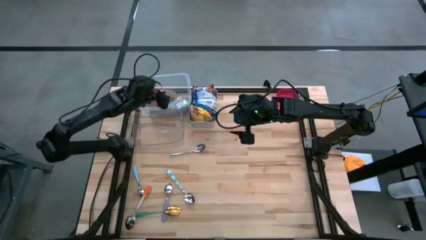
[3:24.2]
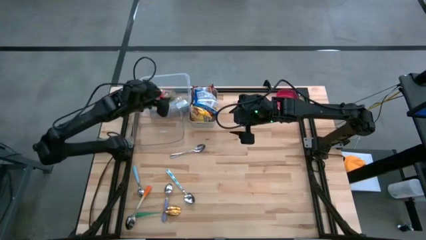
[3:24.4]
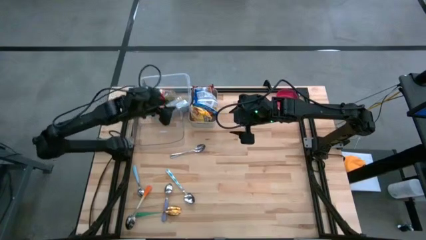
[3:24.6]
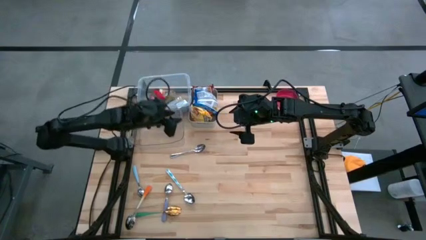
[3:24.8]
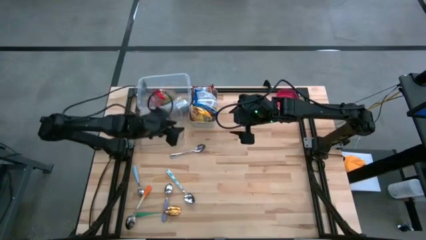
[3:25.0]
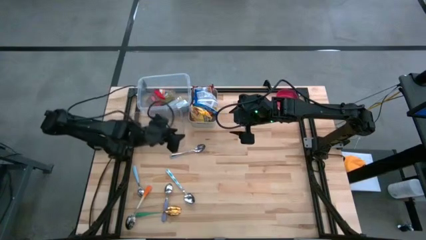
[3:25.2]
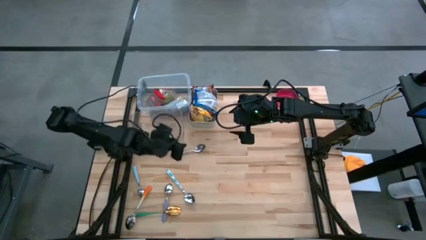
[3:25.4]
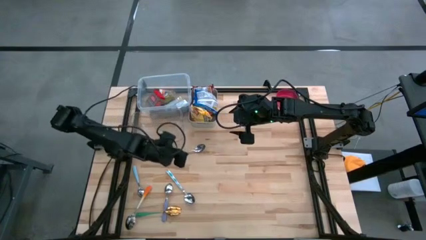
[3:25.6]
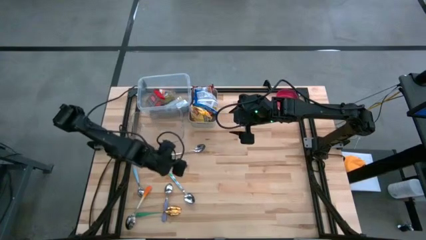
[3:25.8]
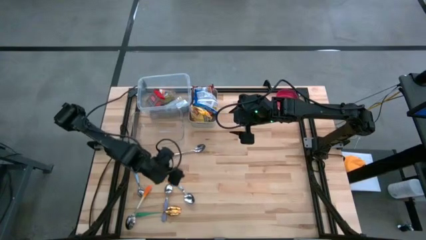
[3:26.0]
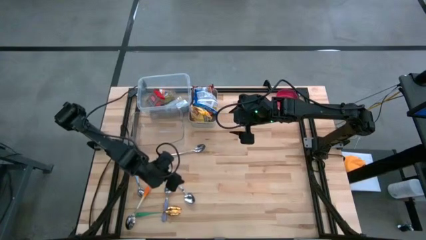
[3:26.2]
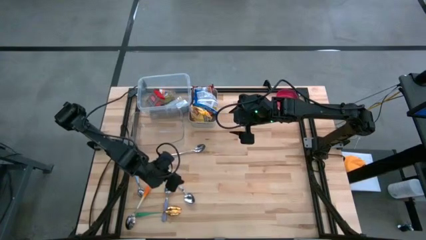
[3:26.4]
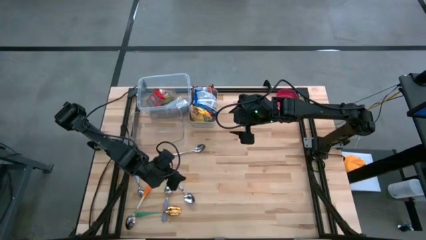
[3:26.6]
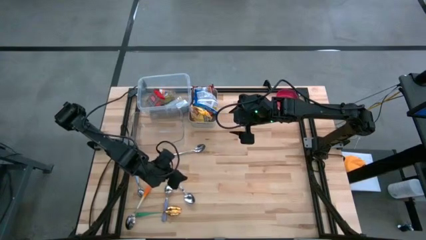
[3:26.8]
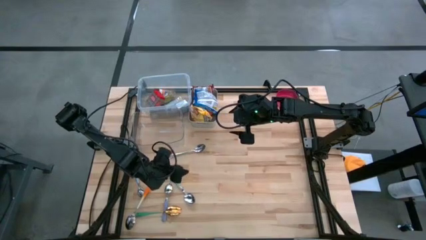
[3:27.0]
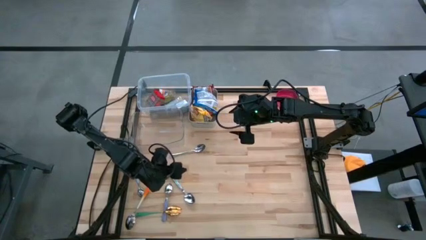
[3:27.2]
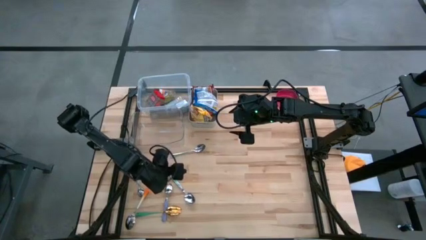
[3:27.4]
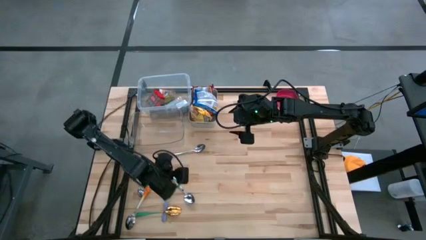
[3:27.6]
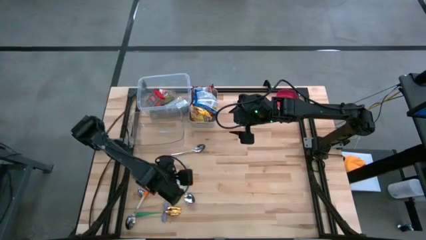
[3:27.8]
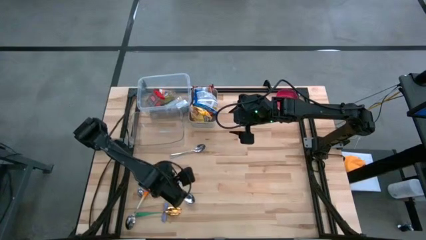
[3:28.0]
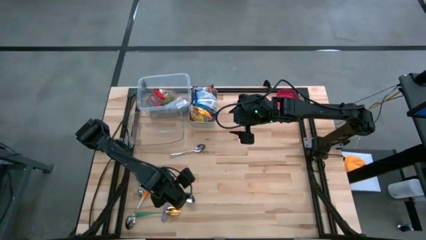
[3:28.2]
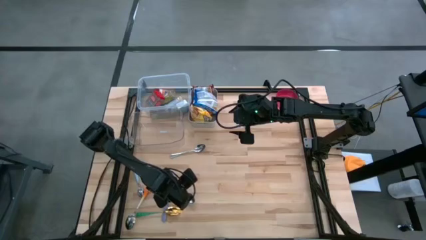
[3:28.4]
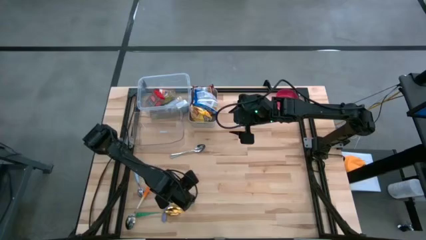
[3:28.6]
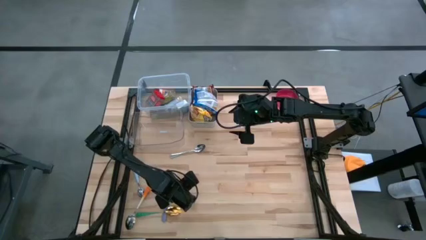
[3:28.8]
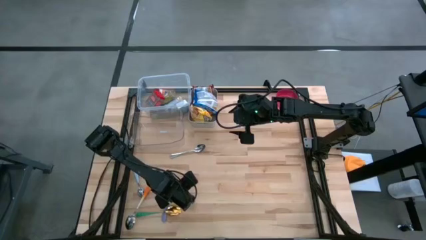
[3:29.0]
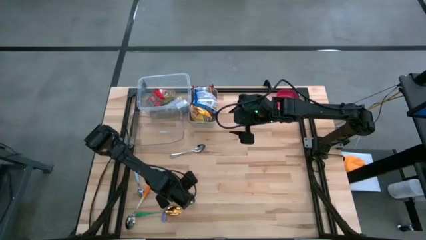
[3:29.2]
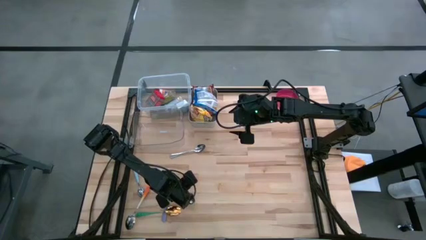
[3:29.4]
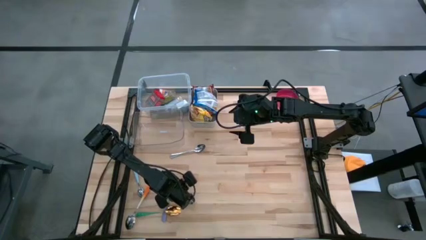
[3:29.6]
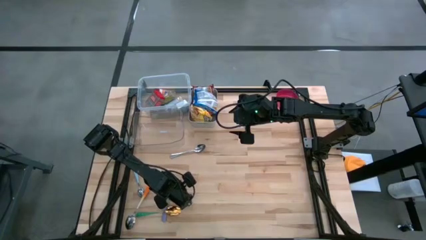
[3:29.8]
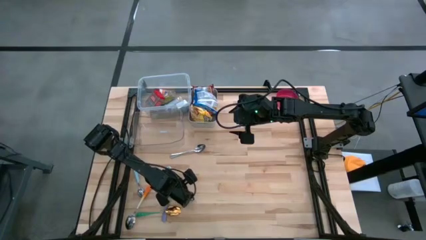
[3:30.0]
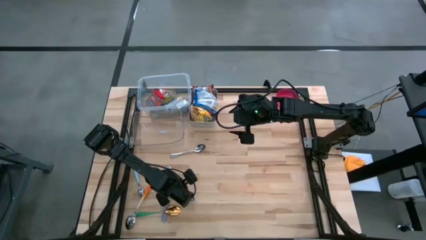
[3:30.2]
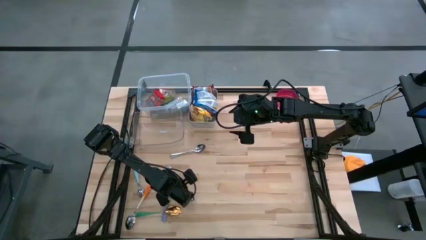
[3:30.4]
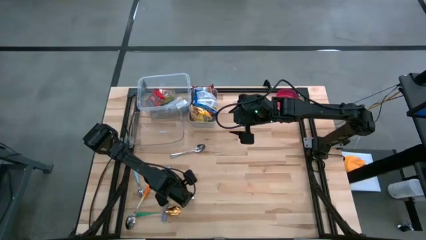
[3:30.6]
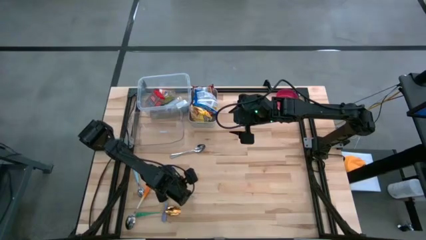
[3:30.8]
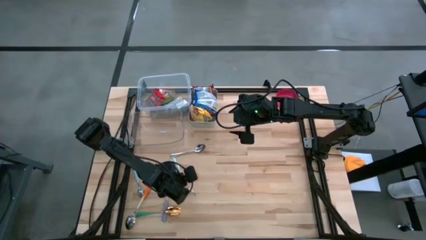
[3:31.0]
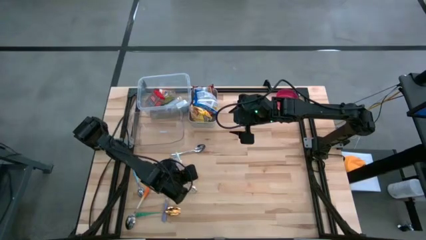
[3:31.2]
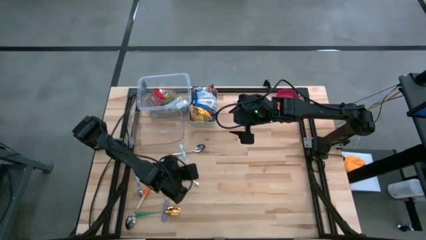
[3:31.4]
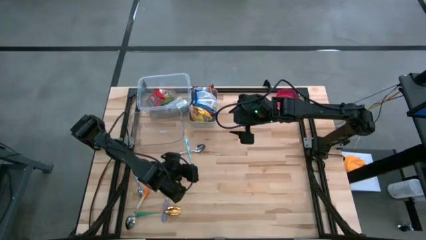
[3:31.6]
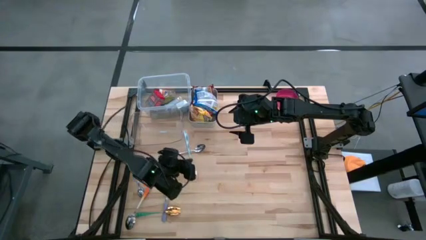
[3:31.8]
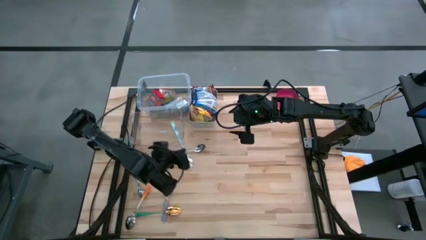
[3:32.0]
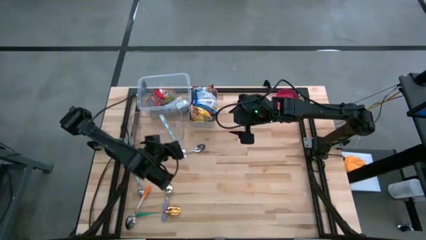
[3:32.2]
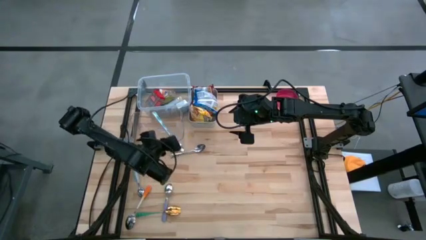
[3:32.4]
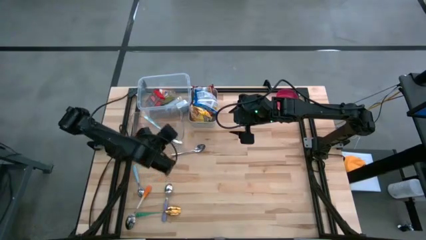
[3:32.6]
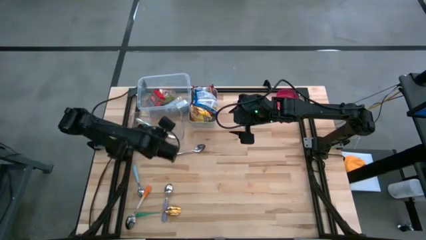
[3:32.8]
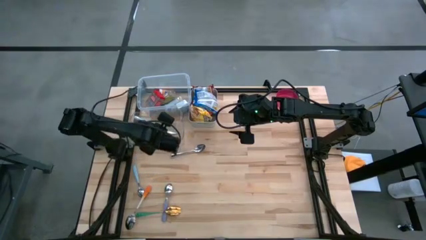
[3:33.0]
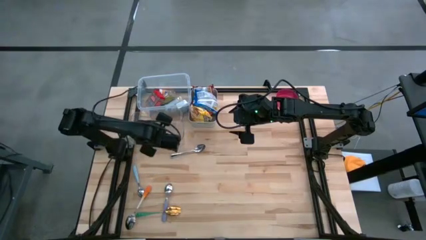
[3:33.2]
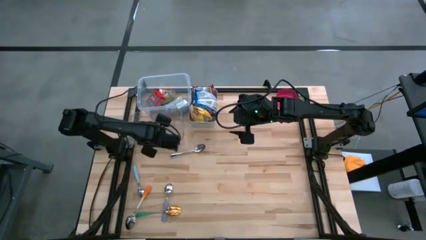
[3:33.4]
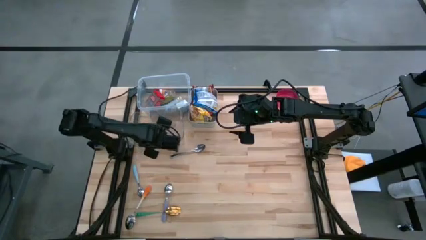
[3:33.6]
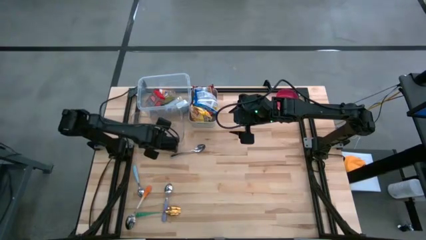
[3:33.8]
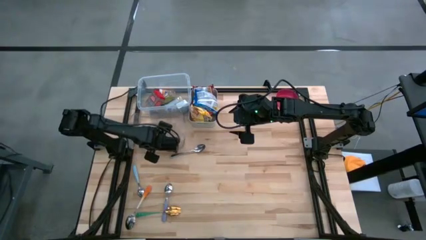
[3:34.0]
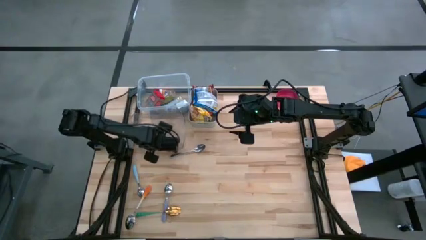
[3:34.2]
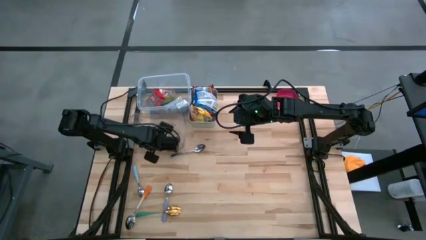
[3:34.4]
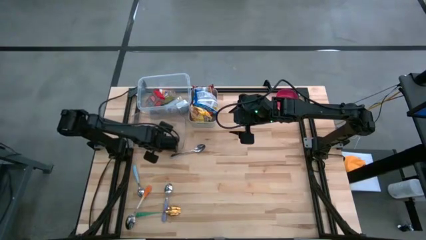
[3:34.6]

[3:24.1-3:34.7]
Put the white spoon into the transparent bin
